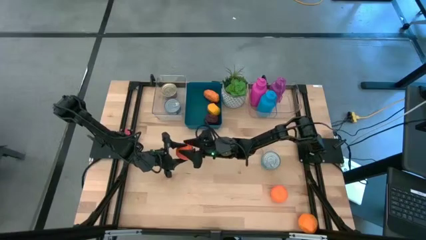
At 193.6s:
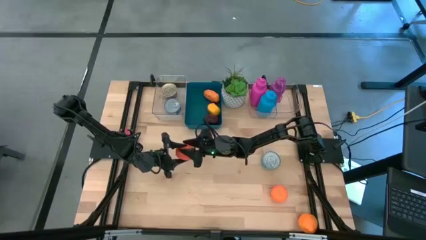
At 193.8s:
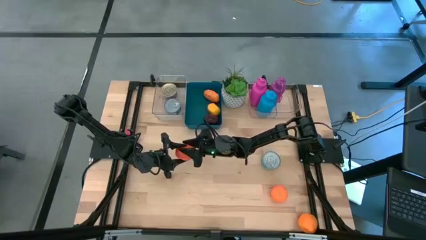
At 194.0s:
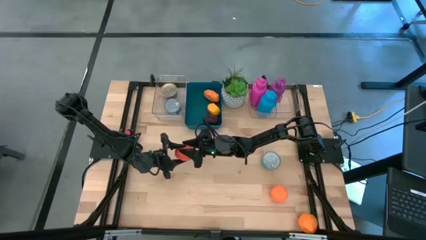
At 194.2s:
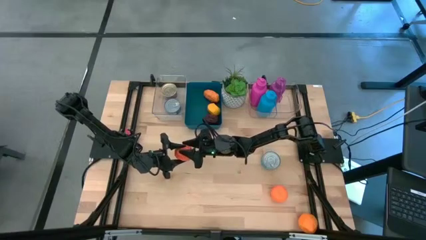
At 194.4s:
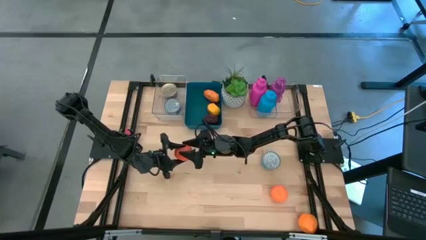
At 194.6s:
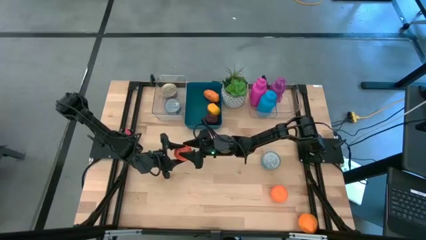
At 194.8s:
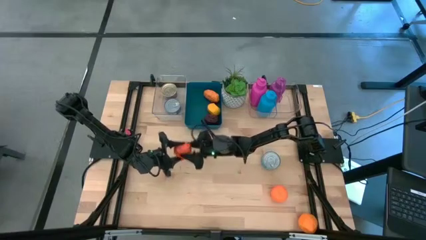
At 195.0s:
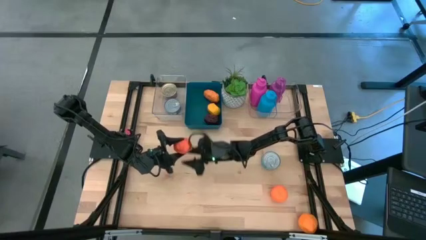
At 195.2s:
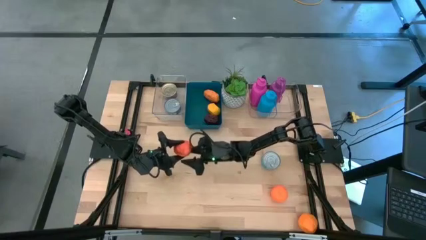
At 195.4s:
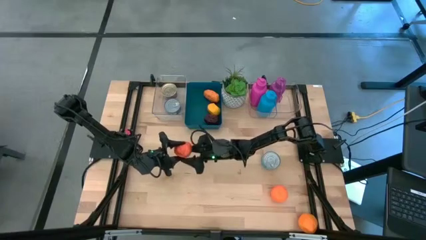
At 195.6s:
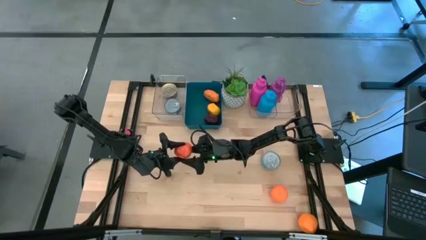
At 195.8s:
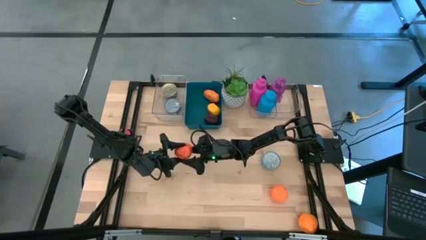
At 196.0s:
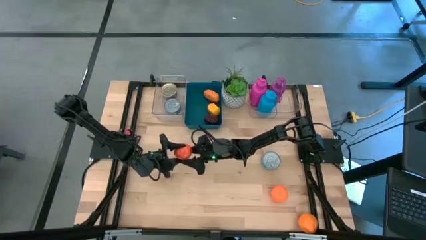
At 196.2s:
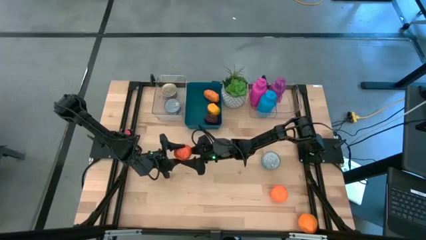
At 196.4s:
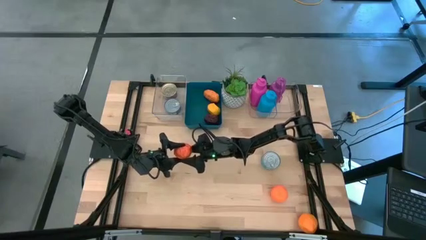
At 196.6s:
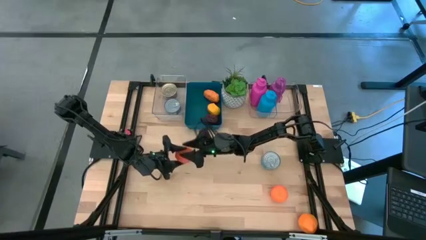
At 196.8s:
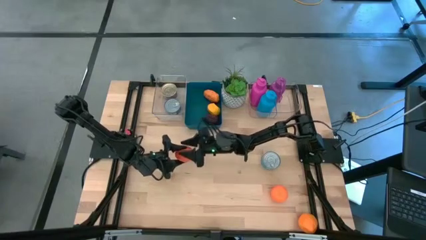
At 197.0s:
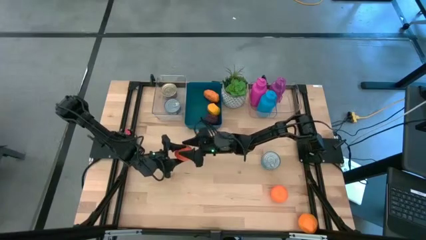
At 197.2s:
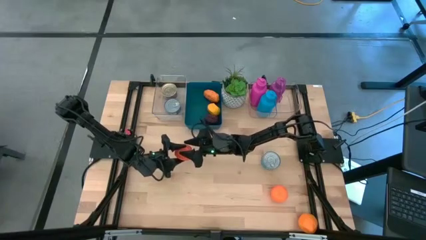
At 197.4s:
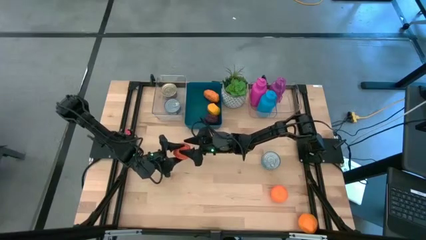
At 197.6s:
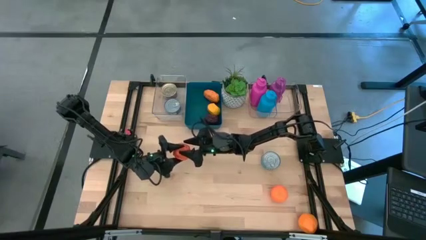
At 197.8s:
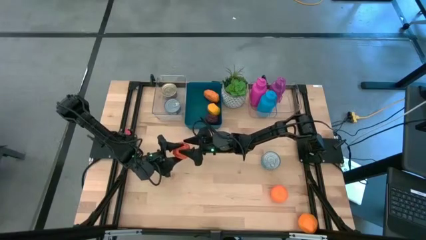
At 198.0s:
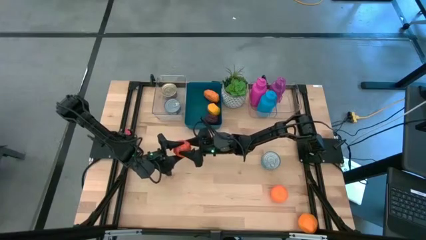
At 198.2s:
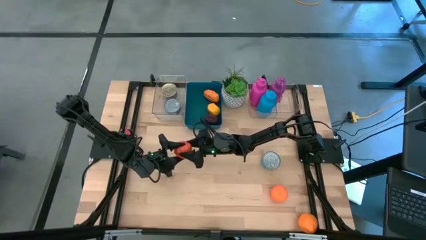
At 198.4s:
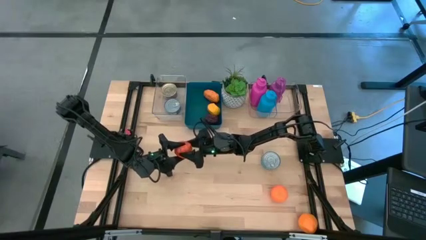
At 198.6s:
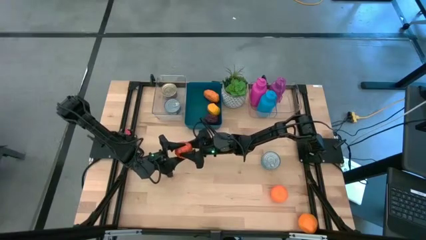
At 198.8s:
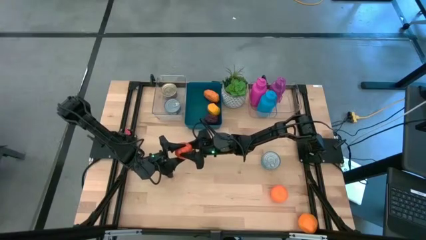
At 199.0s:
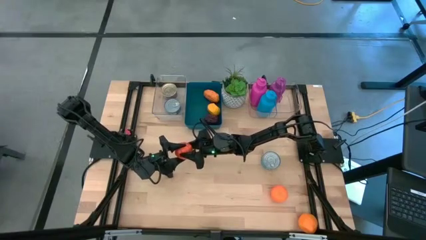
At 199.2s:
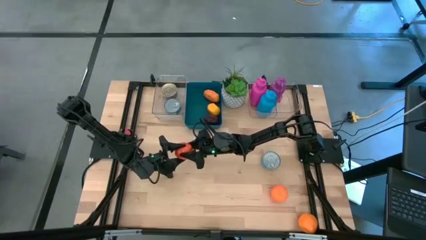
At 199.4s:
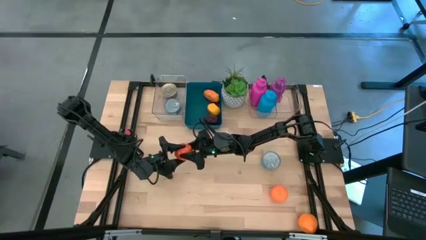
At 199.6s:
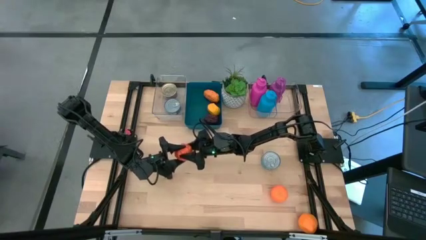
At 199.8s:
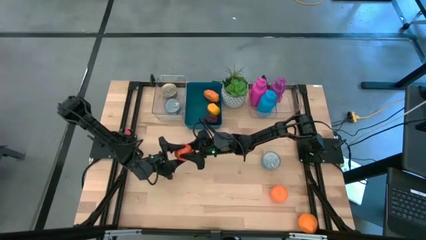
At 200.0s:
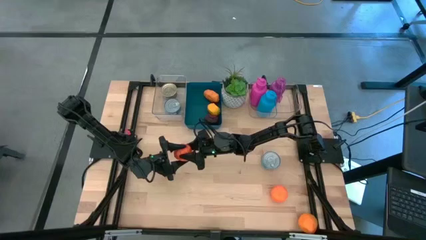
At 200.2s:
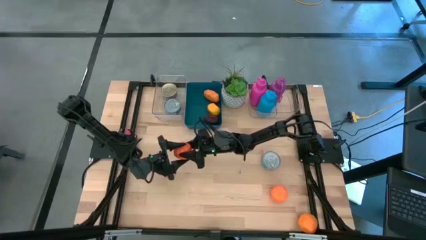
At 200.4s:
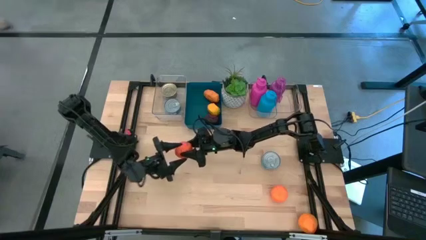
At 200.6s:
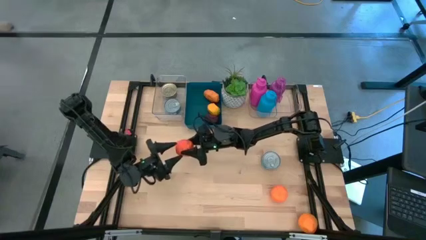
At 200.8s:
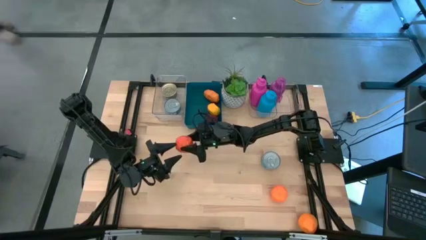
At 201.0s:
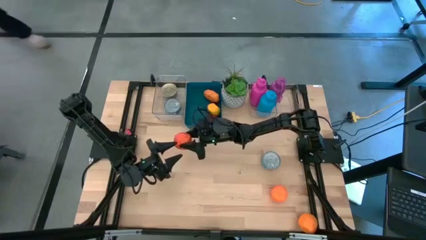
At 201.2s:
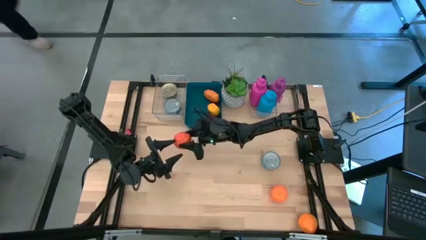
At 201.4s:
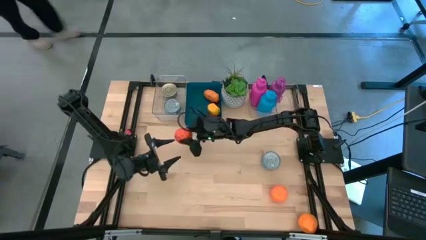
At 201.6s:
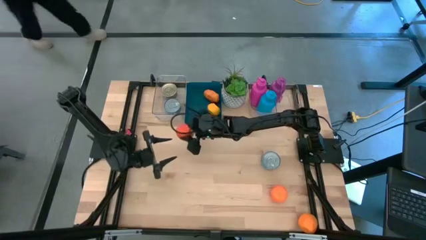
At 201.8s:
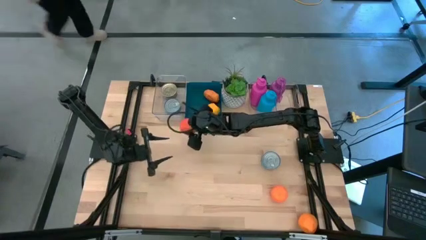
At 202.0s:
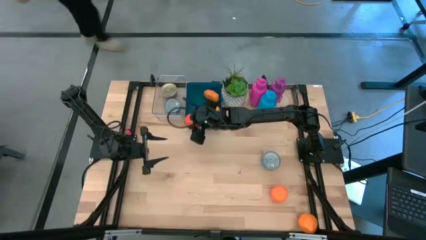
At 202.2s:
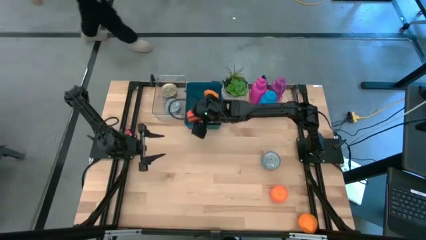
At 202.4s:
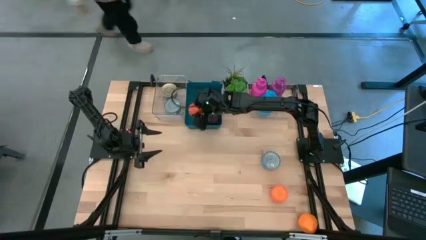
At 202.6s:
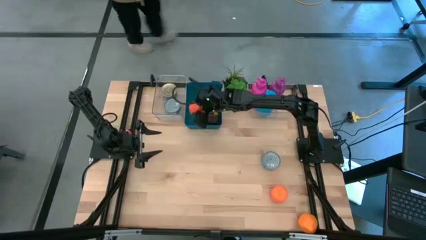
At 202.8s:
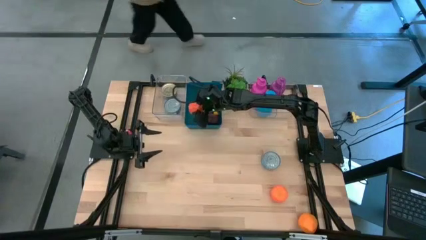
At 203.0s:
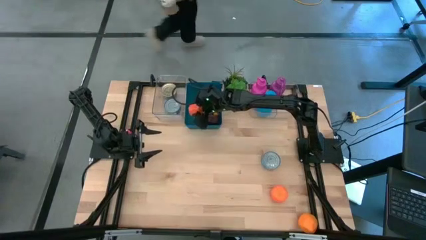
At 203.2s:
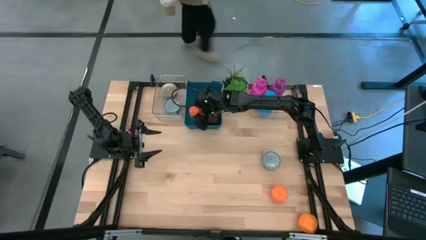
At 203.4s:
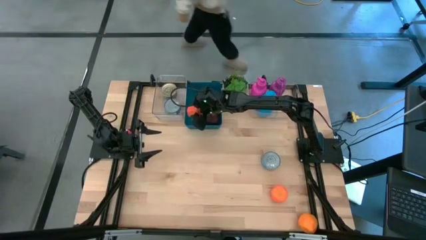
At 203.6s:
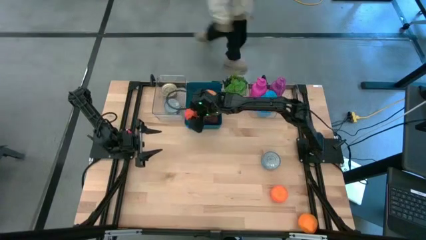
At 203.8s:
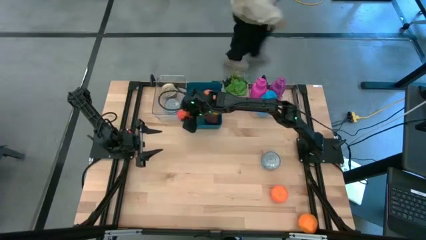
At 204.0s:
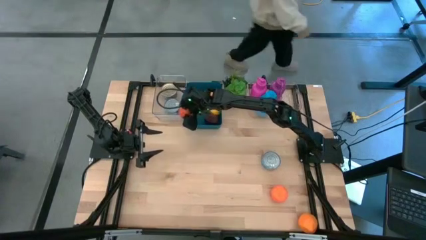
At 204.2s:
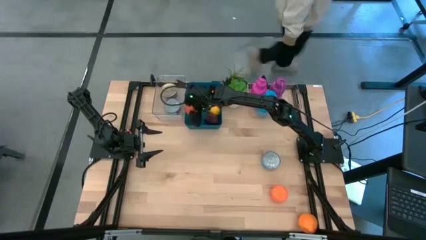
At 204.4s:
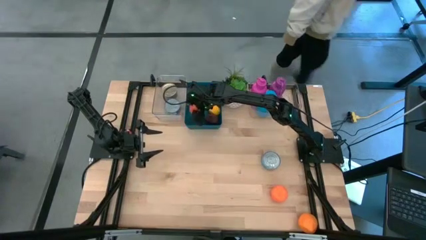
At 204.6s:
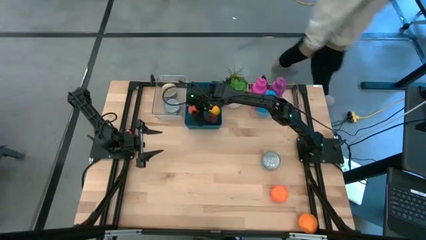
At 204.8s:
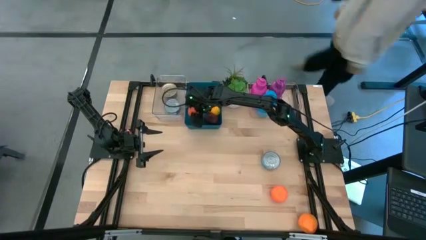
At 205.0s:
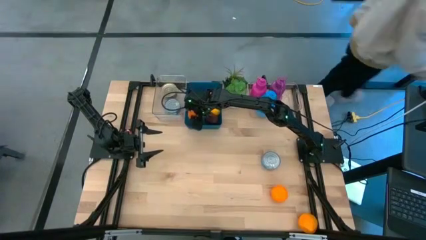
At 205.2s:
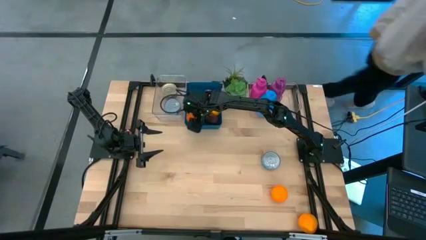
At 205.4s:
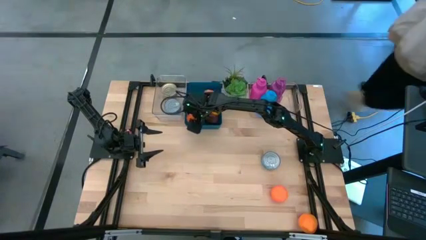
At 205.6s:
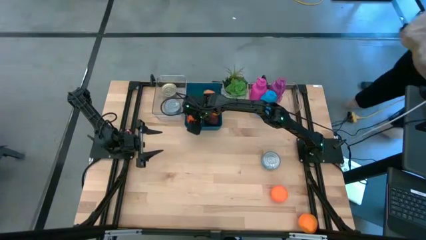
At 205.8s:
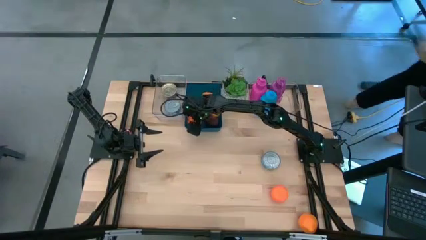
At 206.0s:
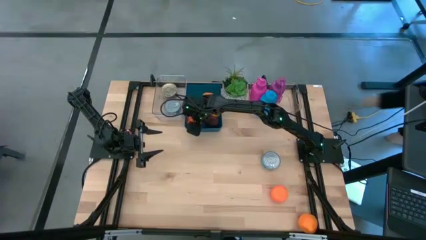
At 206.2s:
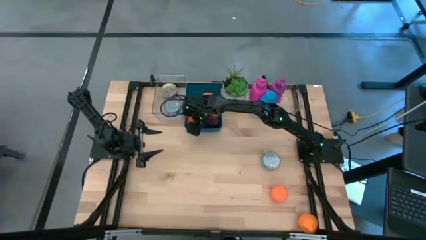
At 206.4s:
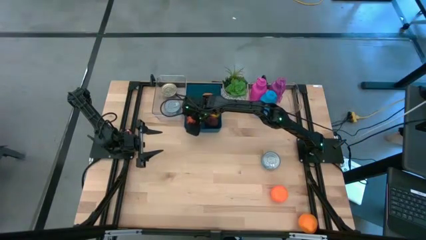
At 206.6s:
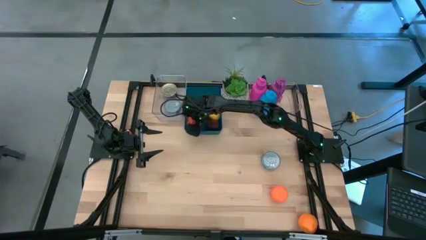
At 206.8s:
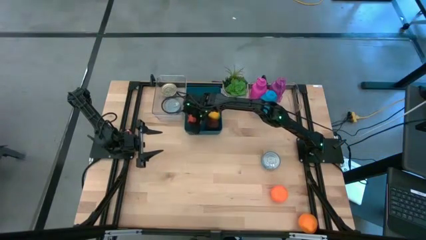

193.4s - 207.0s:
Task: Pick & Place Food Item
Put the left orange into the blue bin

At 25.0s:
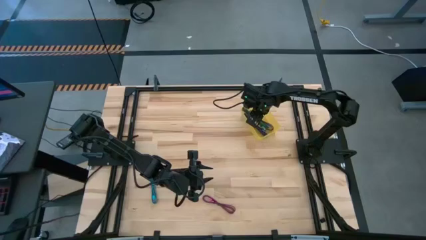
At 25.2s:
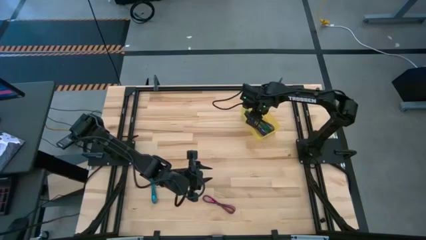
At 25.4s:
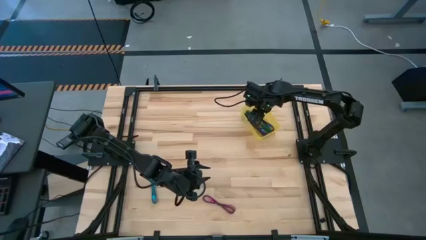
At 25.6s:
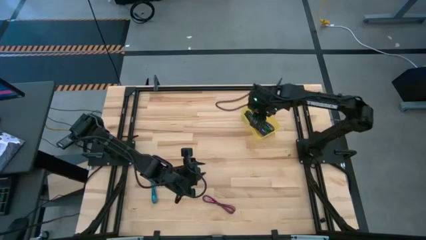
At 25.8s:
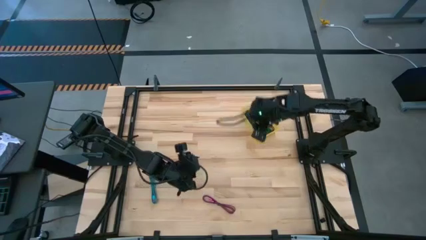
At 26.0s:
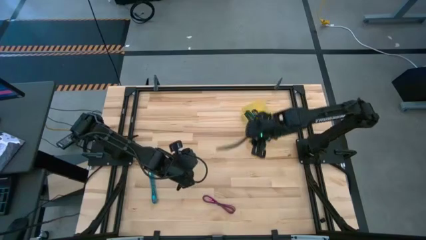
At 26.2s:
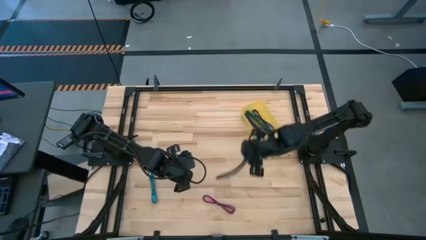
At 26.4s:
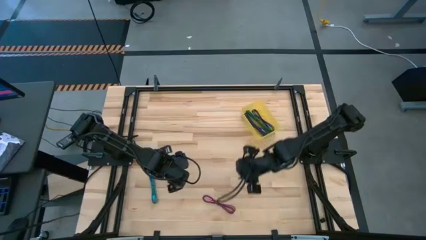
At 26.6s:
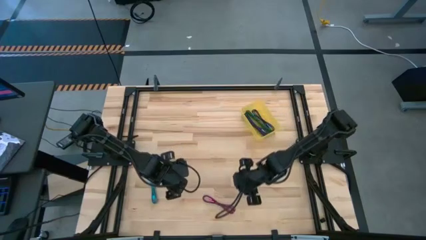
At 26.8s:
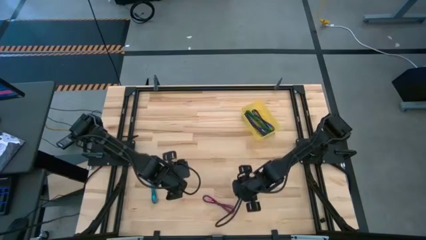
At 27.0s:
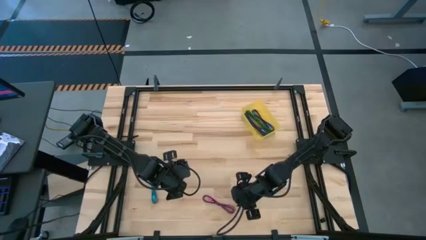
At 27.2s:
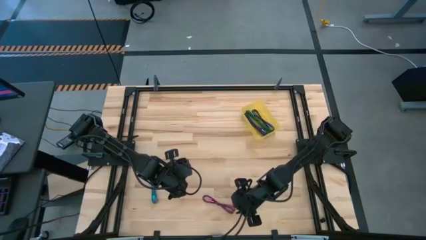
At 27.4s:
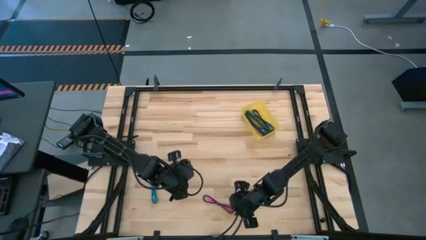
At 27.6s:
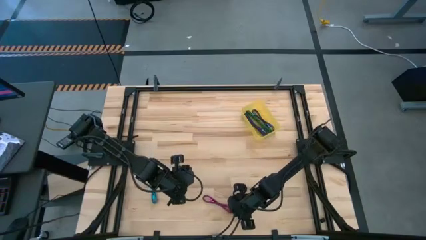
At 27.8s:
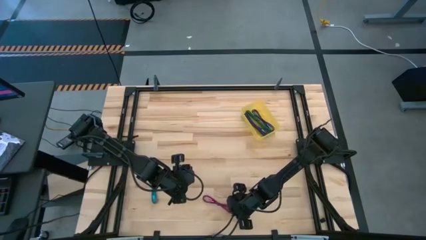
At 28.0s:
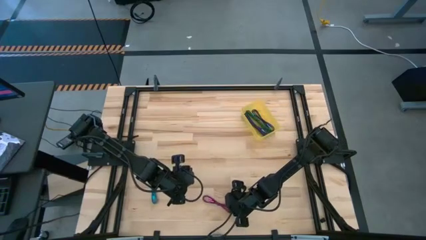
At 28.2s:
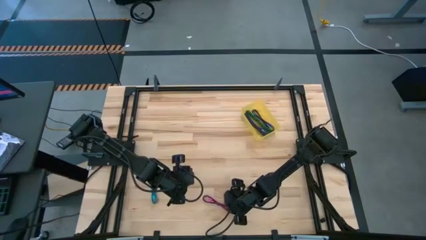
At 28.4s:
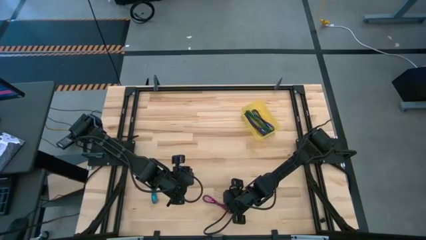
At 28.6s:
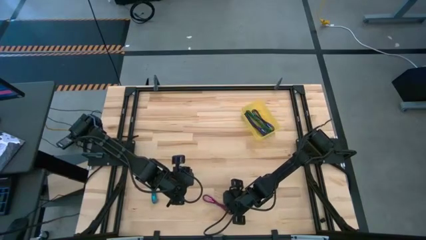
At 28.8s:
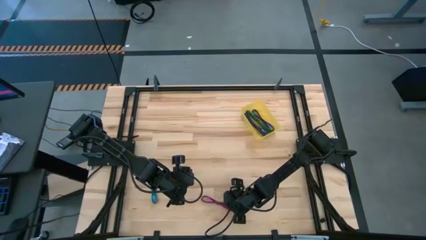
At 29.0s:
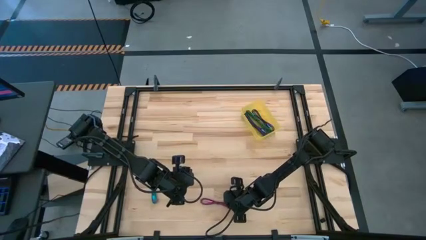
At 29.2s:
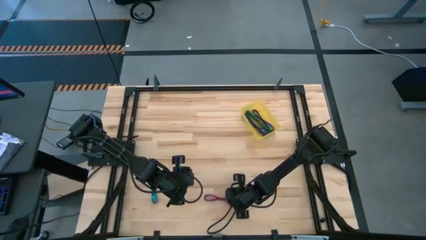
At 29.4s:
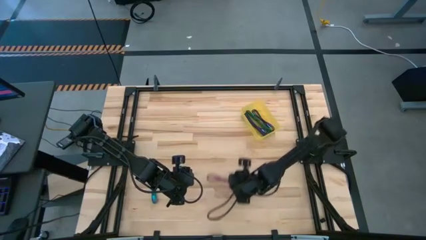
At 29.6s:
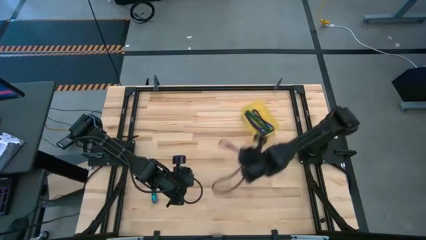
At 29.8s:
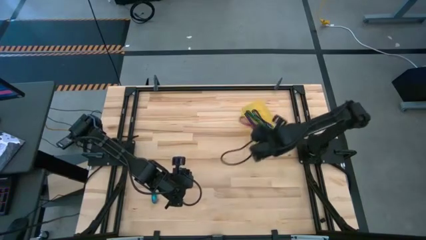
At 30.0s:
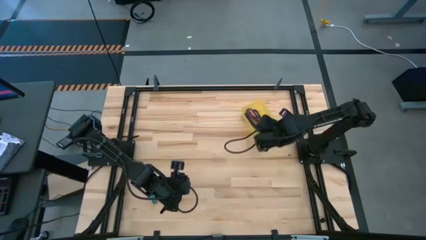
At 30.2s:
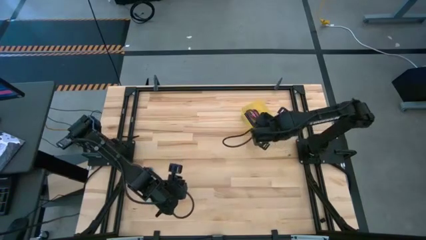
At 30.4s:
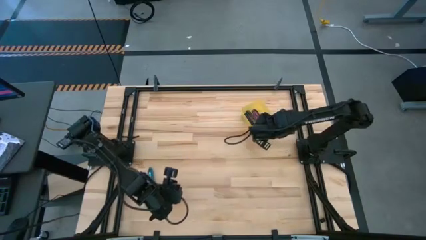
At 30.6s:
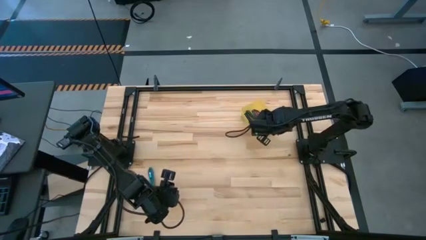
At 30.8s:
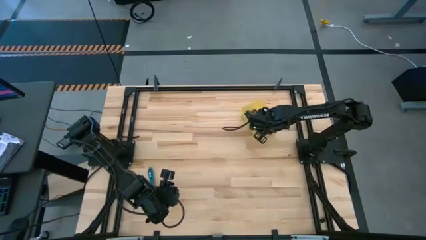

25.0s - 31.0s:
Task: Pick and place USB-C Cables
Put the pink and black charger cable into the yellow bin
